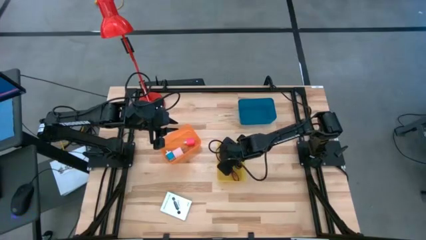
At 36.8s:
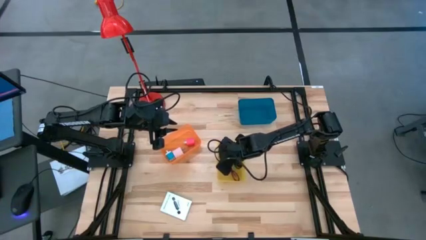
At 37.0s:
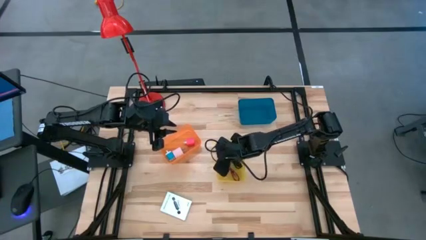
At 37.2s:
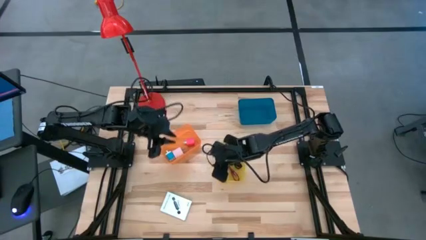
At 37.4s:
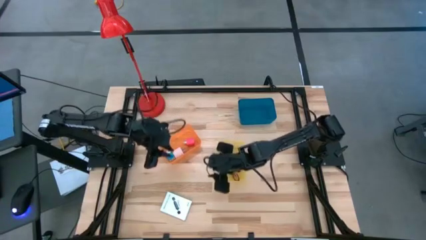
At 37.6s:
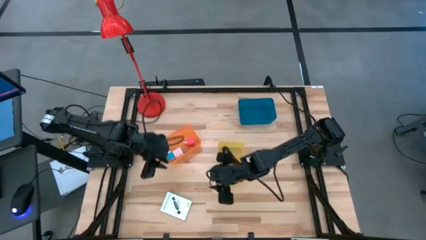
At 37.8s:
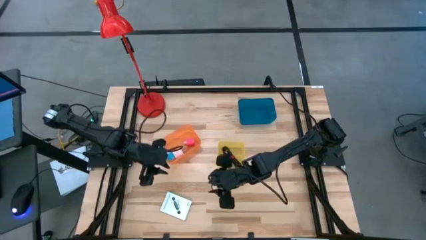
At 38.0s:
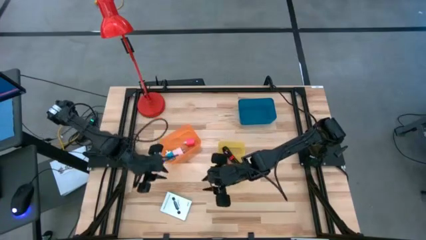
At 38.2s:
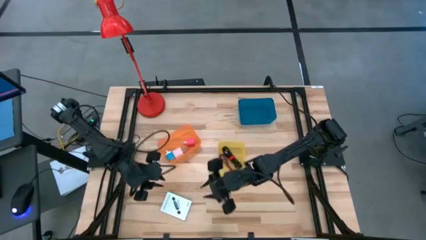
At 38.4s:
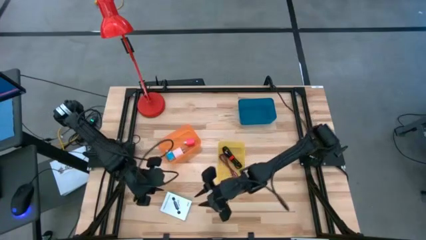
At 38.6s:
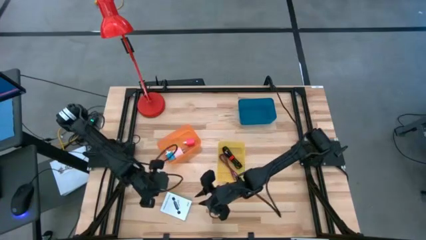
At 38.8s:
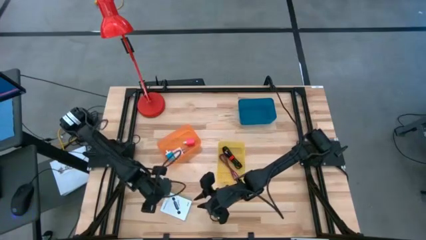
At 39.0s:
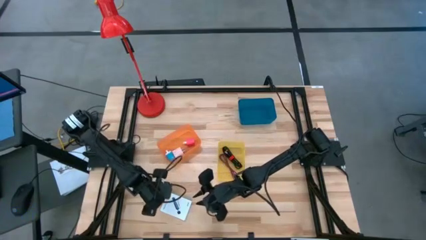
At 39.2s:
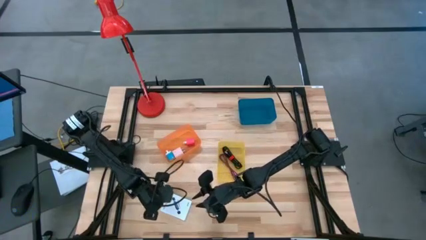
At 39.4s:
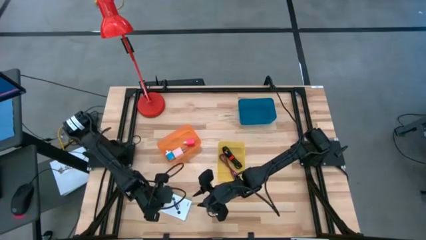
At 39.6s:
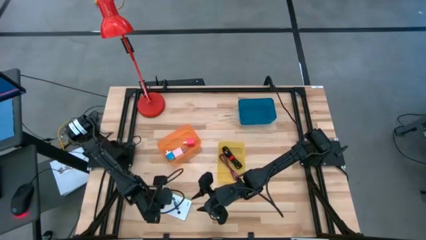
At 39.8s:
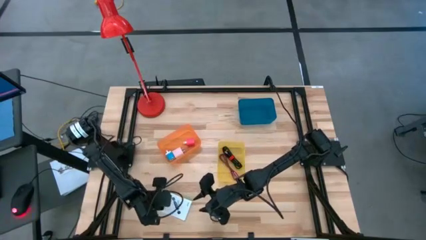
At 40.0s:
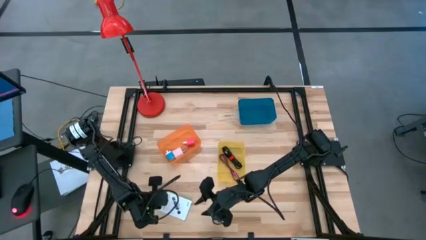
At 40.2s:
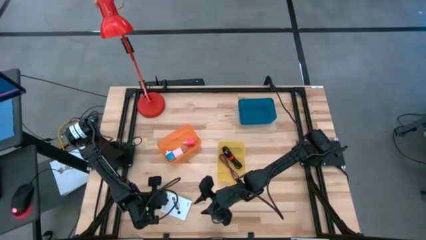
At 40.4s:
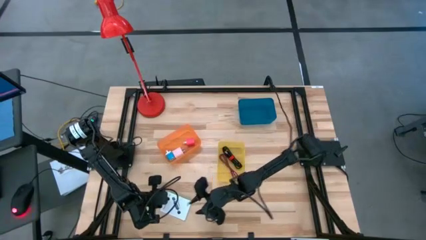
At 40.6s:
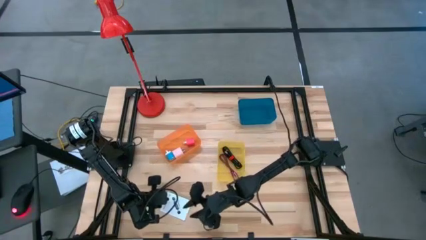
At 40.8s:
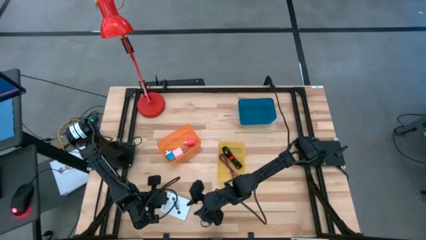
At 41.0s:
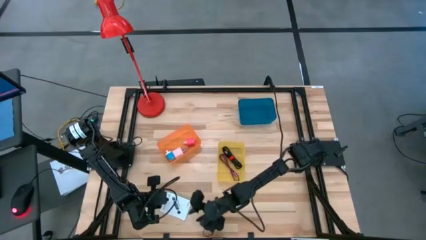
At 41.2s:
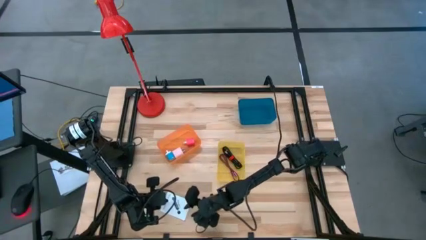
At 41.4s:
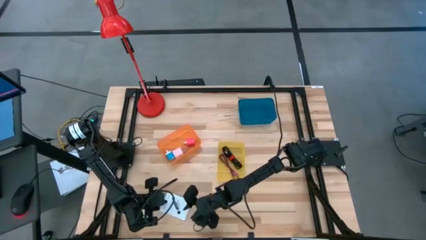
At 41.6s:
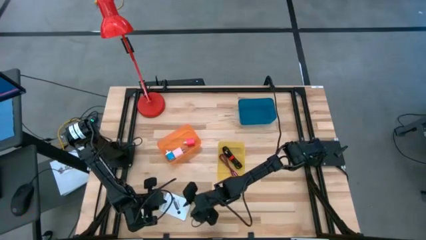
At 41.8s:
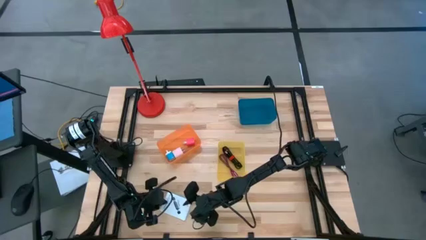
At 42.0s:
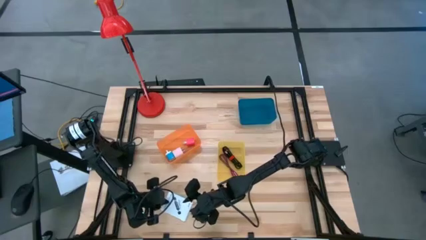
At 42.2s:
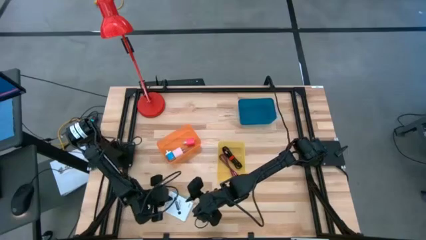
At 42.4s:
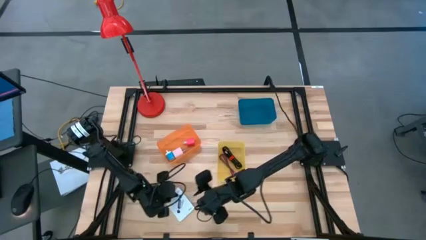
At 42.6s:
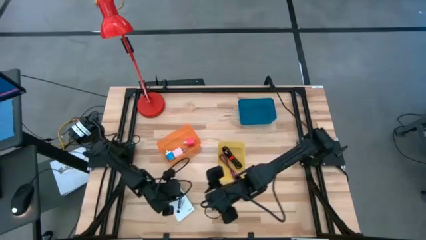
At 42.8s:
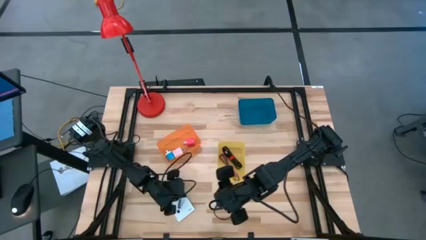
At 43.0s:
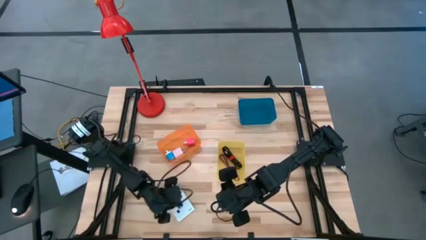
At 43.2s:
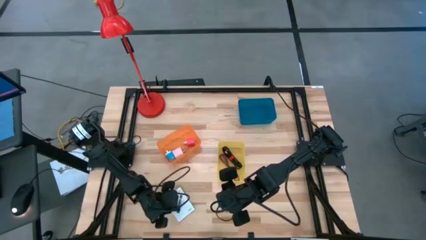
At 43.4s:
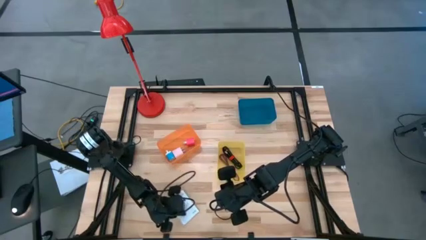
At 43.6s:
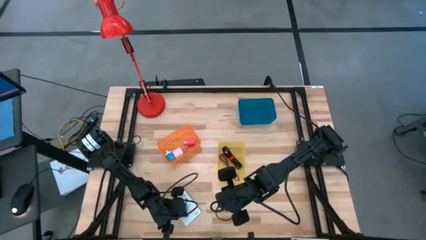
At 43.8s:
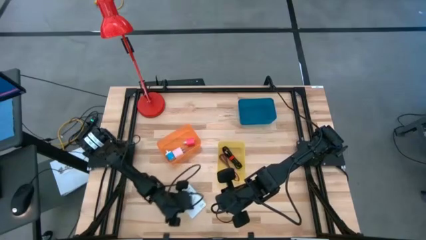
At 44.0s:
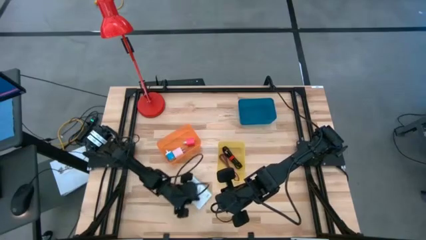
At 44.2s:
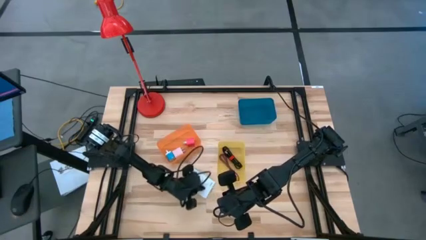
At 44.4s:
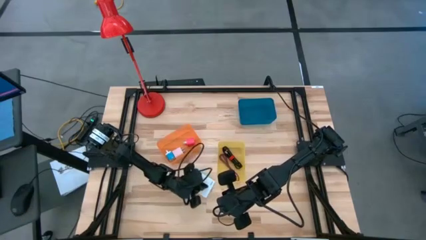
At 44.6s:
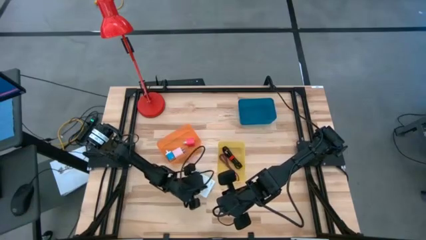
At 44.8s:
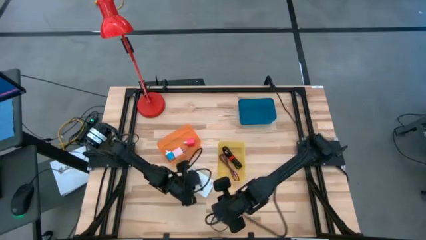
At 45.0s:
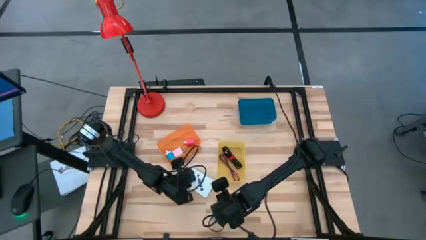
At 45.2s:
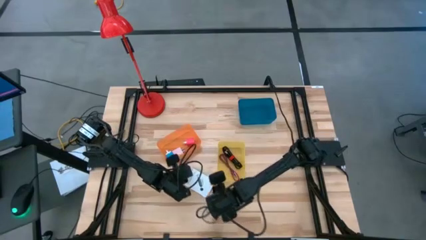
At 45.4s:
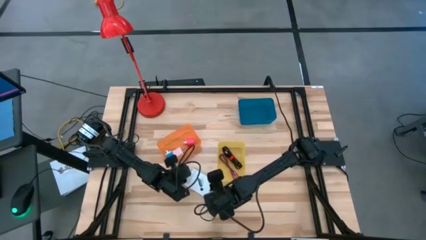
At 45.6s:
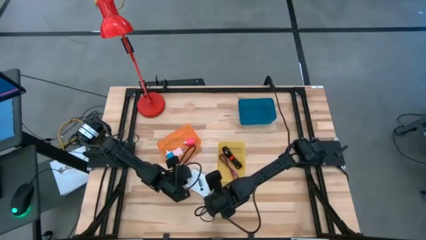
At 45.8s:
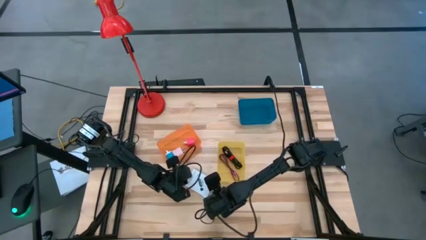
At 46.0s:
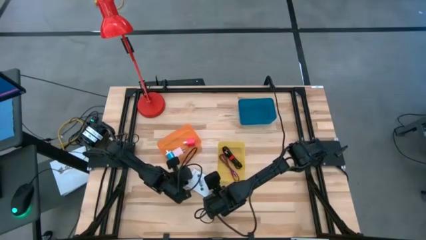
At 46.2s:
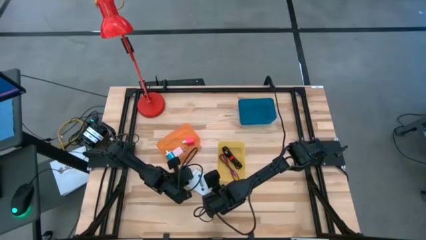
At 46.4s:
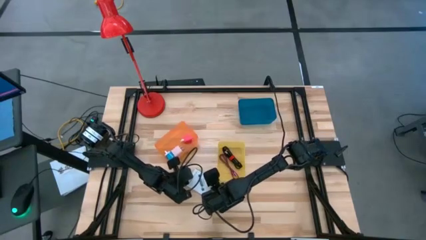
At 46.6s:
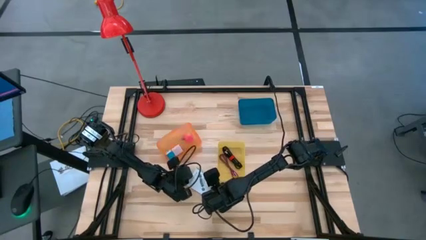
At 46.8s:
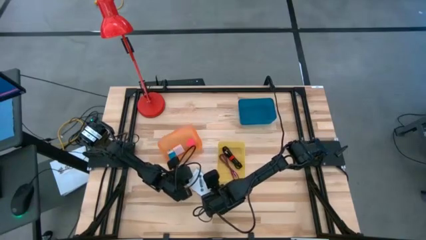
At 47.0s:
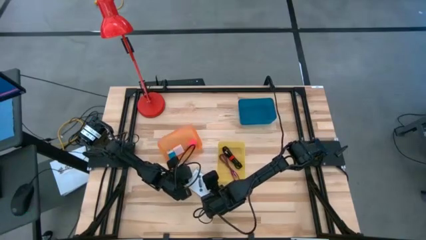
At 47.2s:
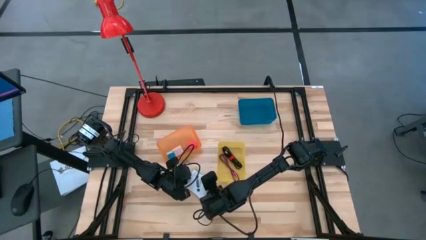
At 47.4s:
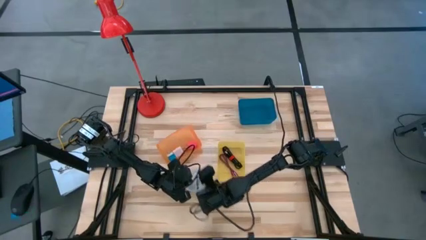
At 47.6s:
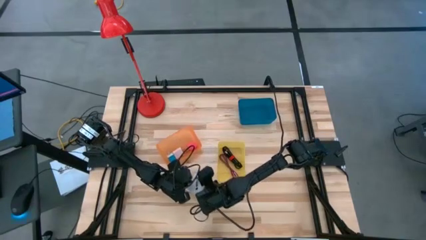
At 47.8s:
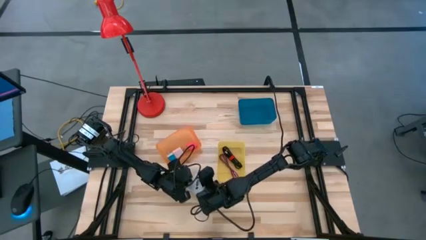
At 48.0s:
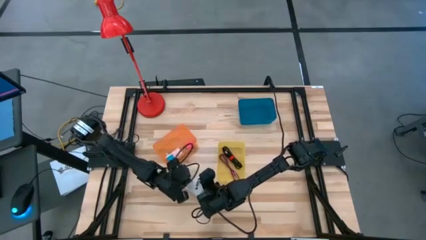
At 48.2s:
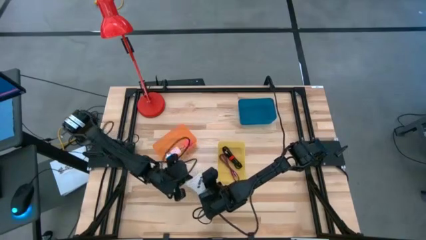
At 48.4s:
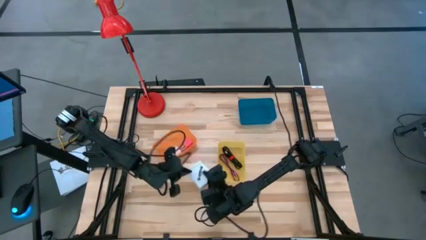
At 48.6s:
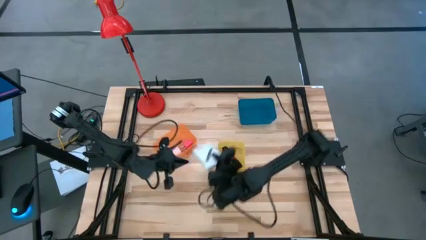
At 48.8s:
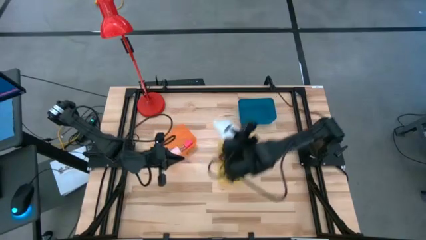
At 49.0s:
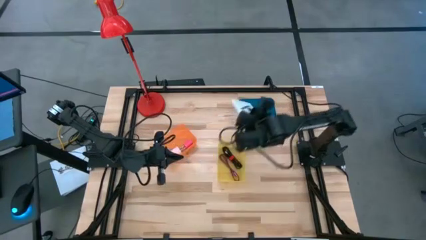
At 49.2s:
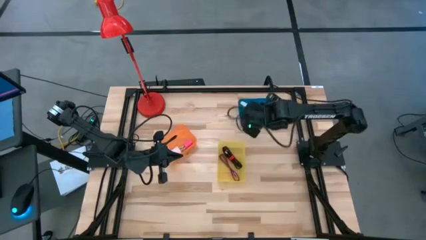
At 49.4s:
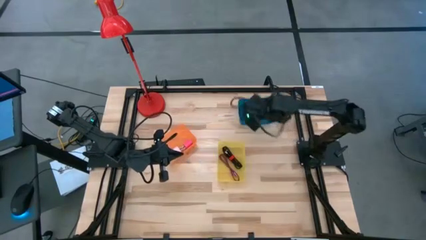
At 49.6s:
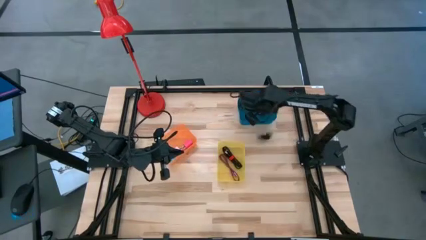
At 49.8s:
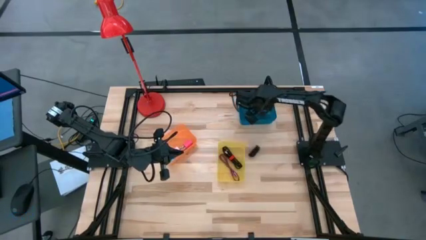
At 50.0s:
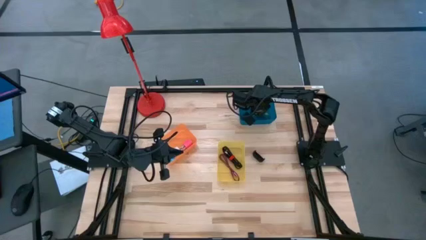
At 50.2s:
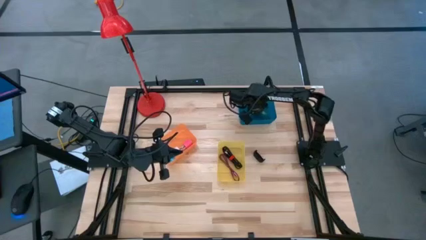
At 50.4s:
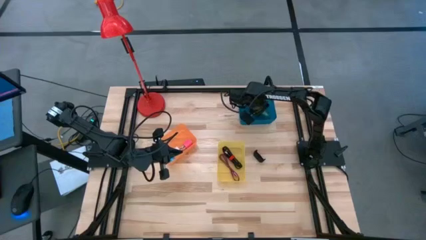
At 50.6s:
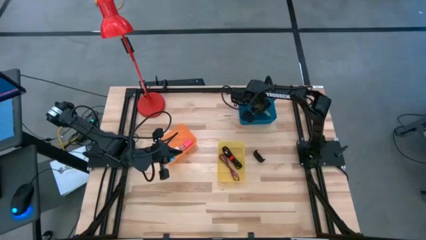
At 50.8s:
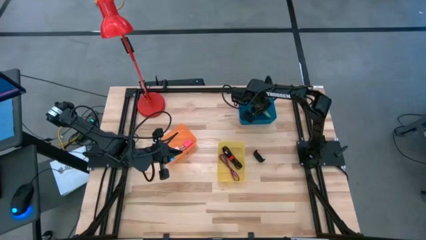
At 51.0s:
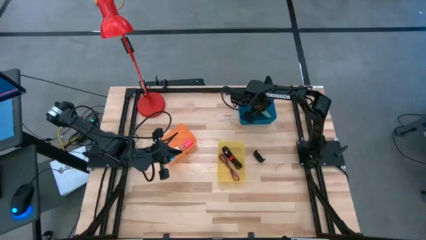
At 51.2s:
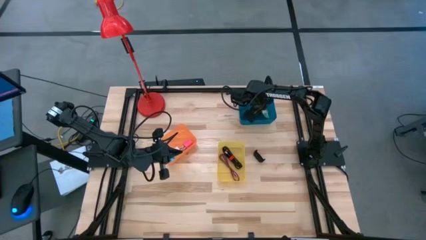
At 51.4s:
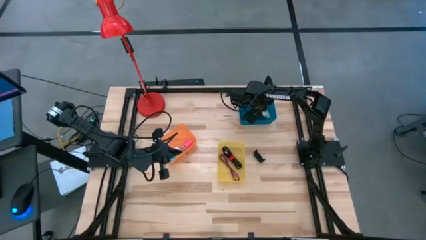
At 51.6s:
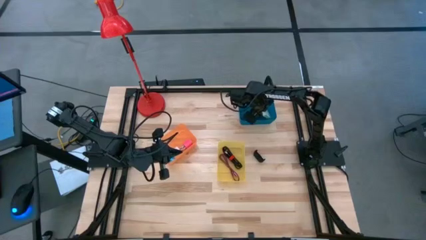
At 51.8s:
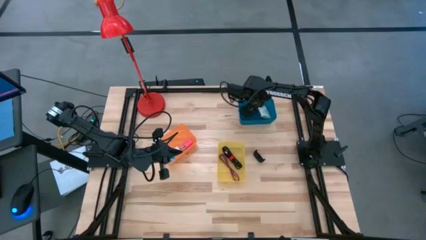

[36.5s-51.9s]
Task: Pick and place items into bin
Put the white card reader box into the blue bin
